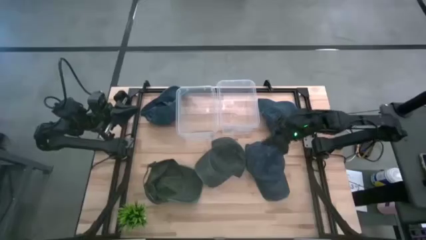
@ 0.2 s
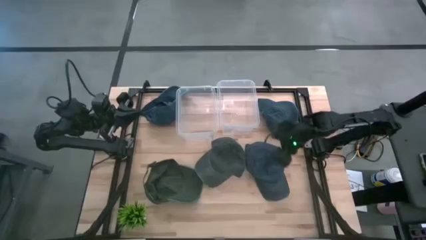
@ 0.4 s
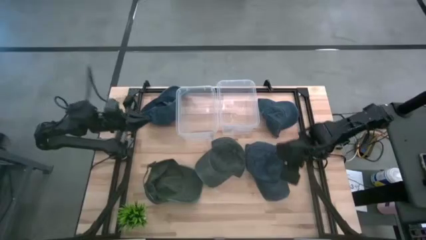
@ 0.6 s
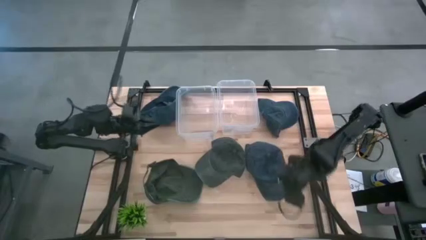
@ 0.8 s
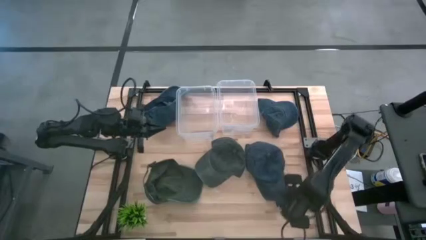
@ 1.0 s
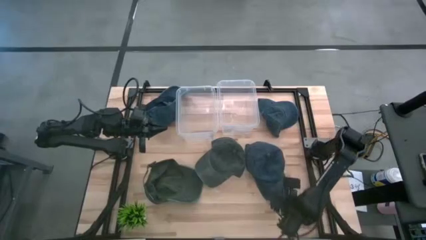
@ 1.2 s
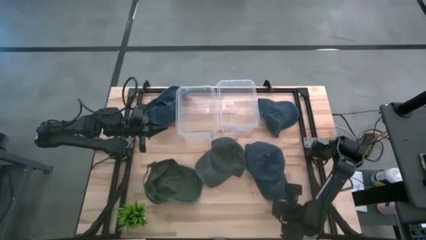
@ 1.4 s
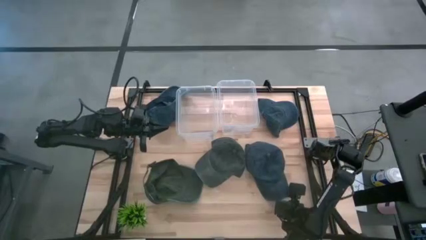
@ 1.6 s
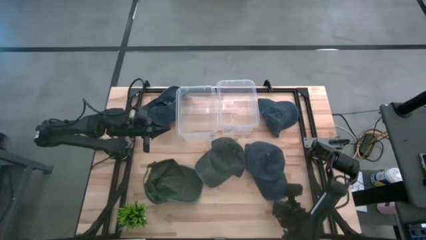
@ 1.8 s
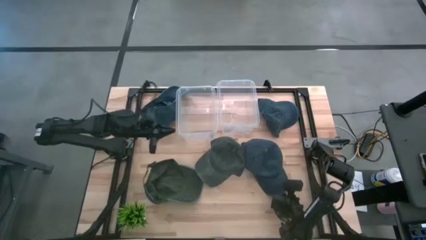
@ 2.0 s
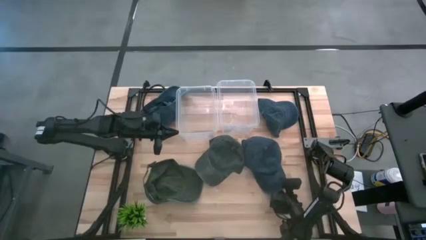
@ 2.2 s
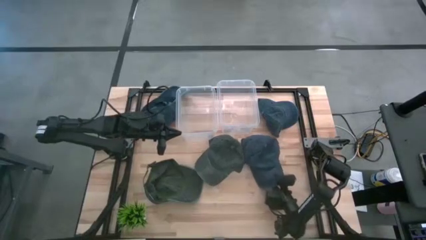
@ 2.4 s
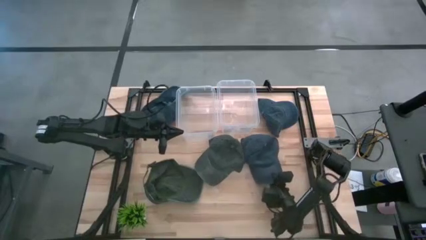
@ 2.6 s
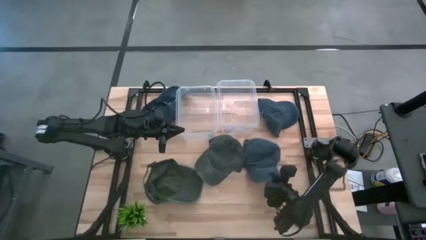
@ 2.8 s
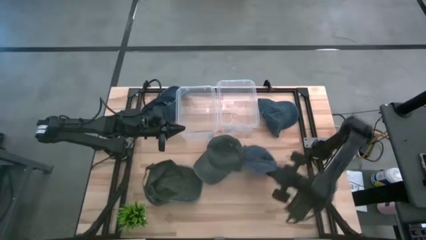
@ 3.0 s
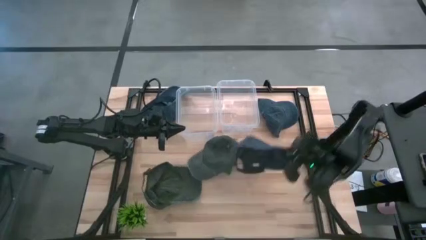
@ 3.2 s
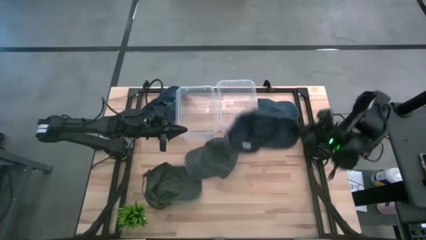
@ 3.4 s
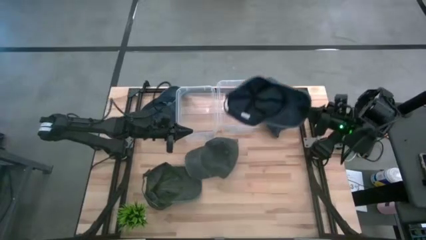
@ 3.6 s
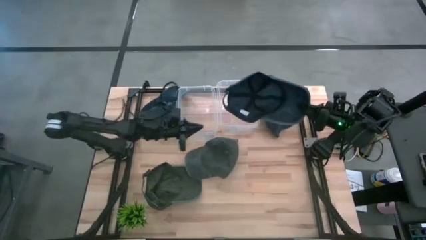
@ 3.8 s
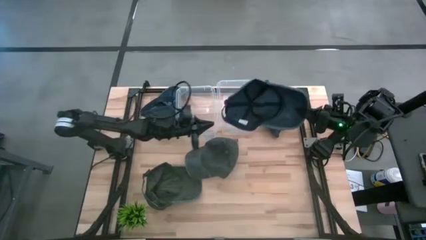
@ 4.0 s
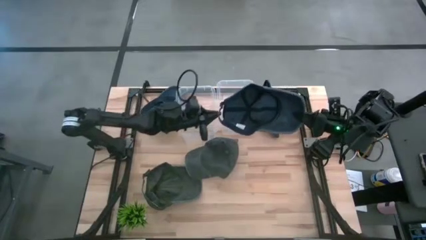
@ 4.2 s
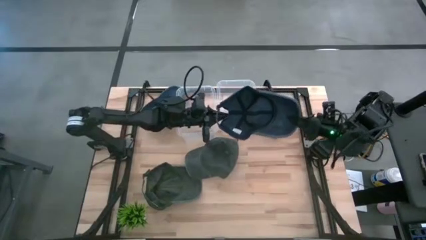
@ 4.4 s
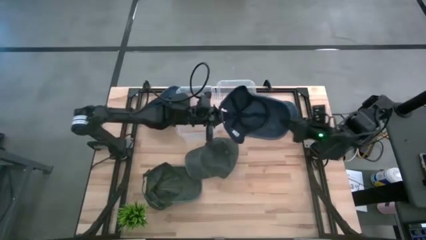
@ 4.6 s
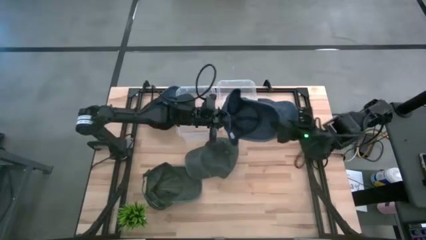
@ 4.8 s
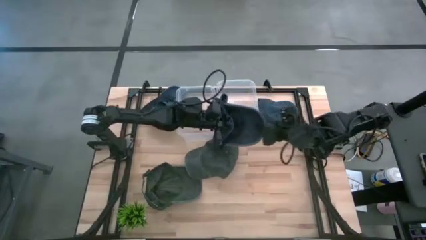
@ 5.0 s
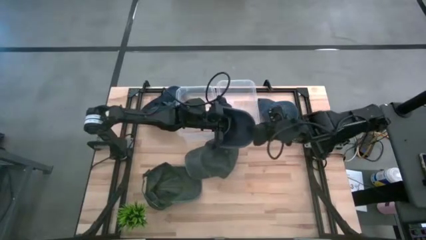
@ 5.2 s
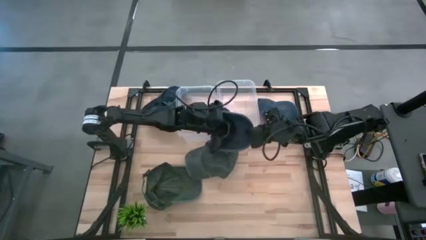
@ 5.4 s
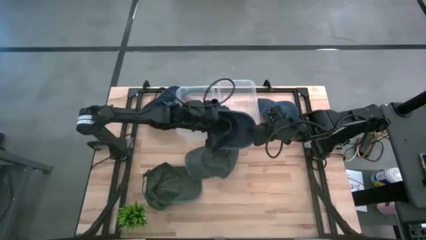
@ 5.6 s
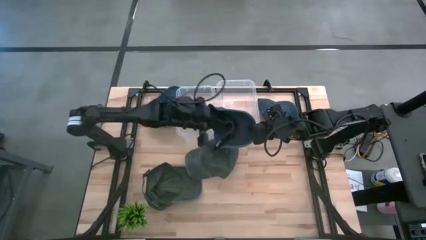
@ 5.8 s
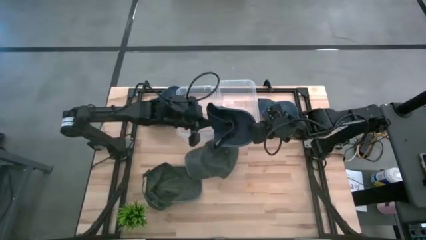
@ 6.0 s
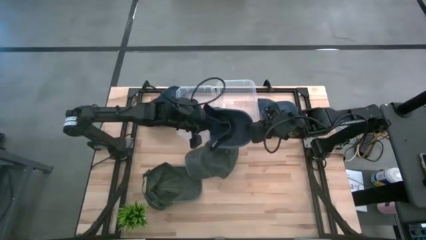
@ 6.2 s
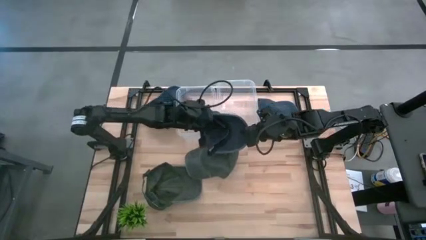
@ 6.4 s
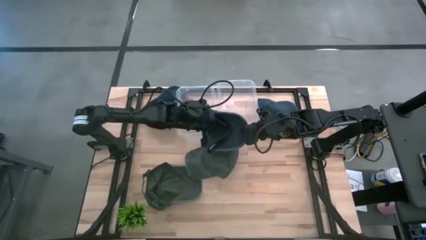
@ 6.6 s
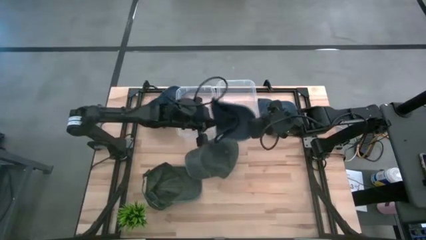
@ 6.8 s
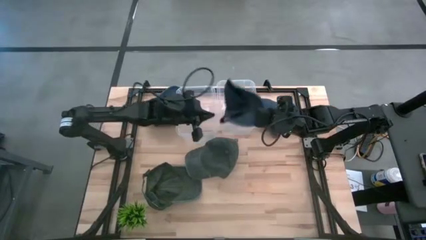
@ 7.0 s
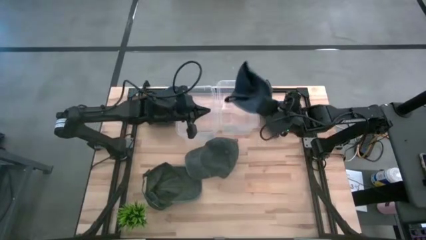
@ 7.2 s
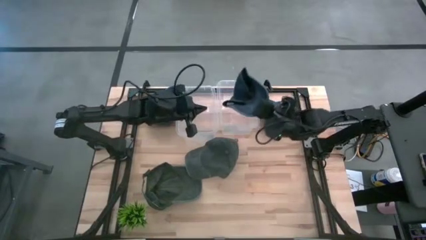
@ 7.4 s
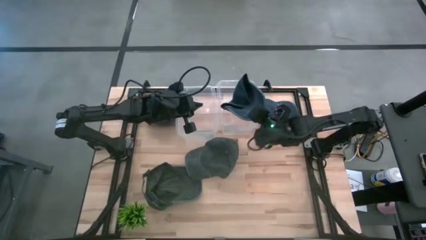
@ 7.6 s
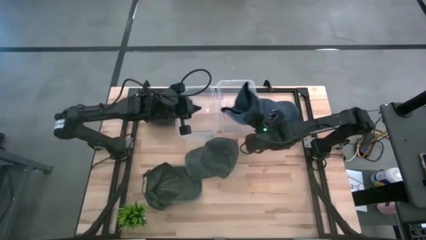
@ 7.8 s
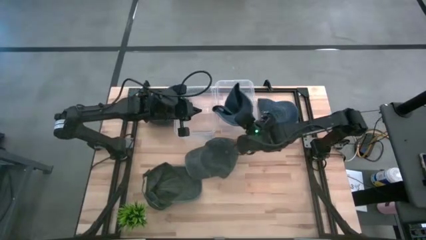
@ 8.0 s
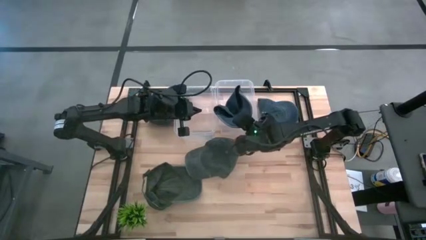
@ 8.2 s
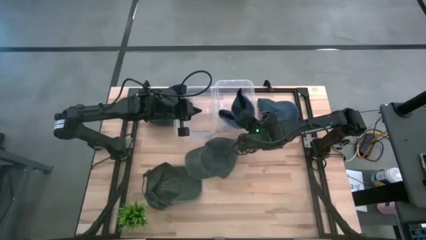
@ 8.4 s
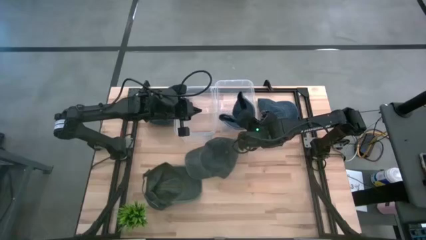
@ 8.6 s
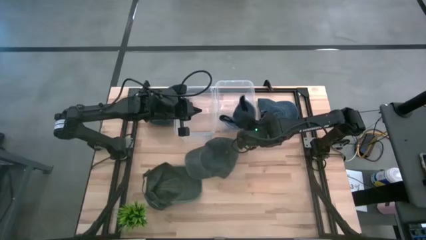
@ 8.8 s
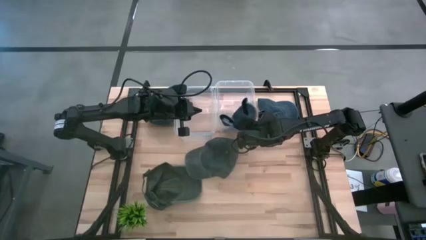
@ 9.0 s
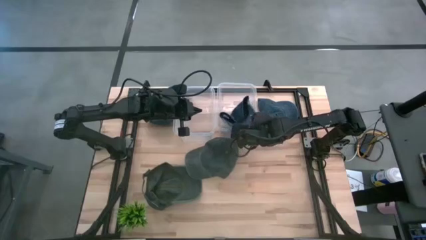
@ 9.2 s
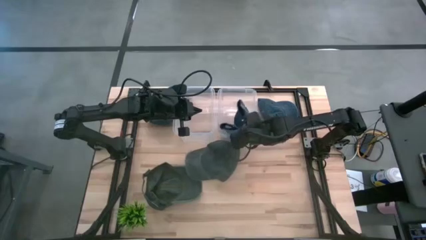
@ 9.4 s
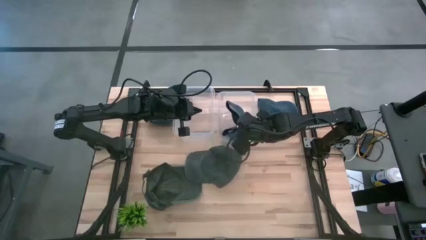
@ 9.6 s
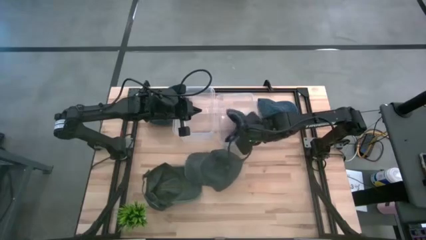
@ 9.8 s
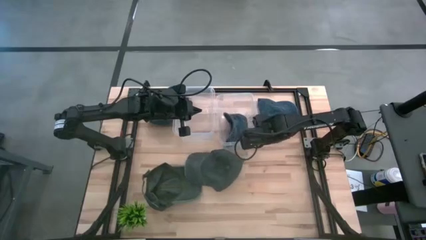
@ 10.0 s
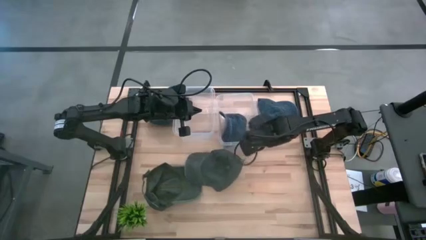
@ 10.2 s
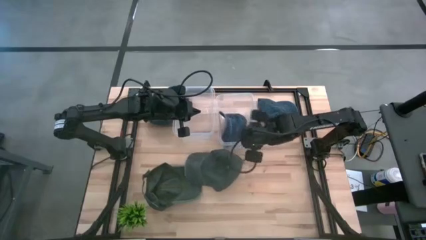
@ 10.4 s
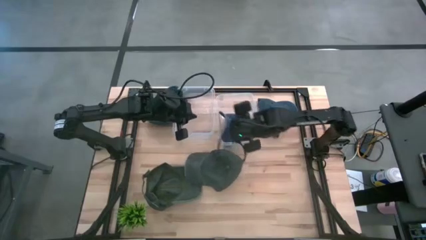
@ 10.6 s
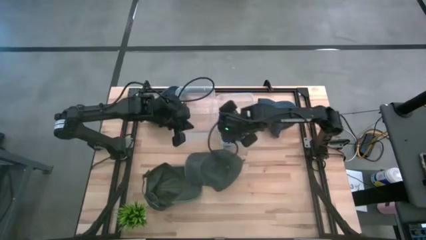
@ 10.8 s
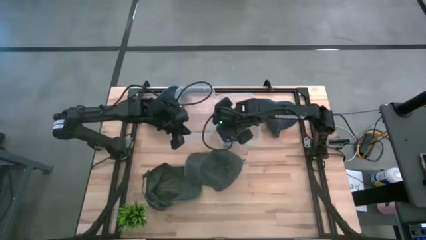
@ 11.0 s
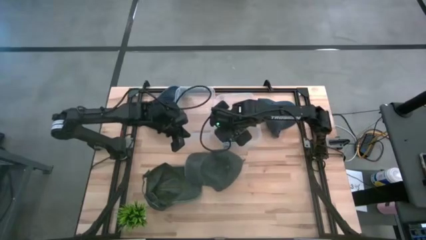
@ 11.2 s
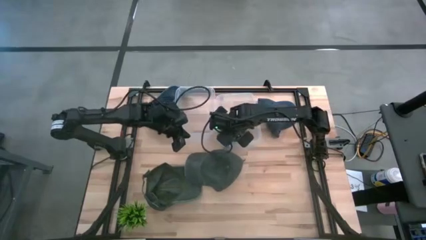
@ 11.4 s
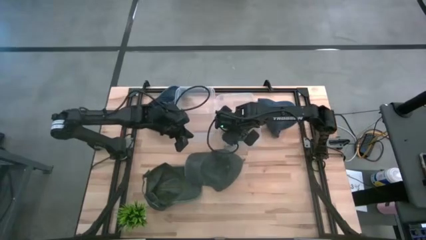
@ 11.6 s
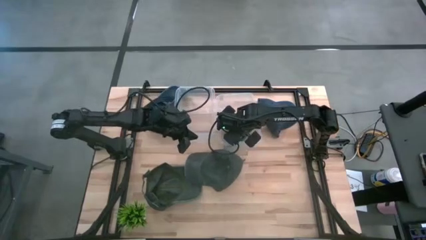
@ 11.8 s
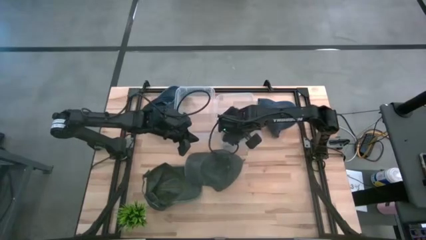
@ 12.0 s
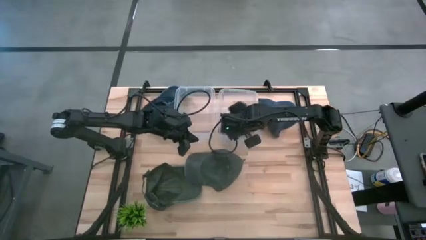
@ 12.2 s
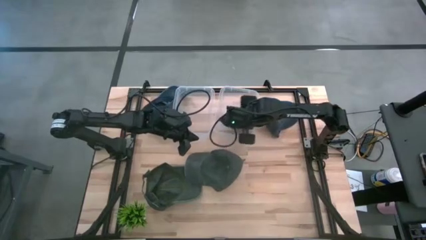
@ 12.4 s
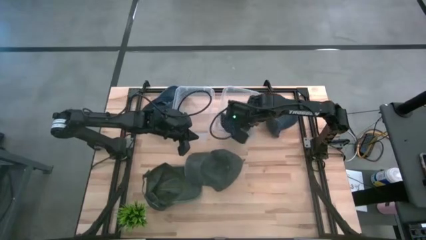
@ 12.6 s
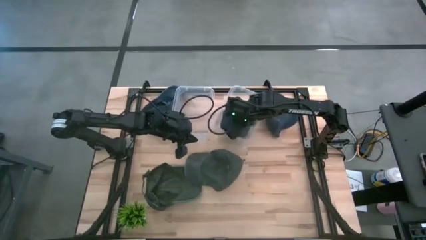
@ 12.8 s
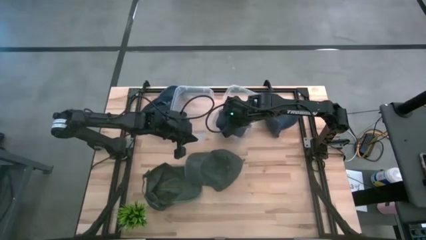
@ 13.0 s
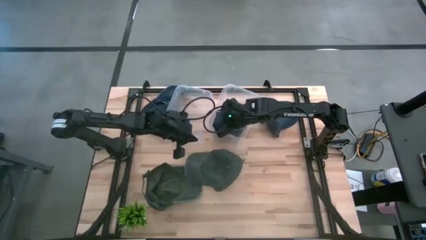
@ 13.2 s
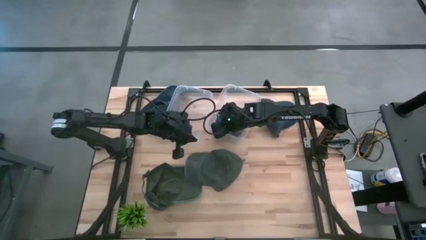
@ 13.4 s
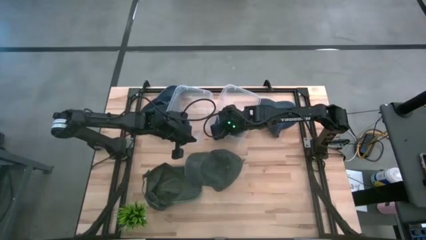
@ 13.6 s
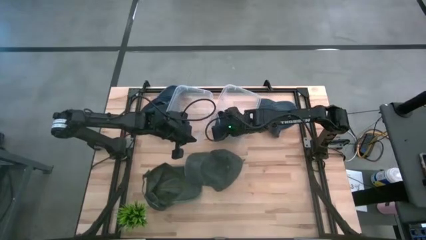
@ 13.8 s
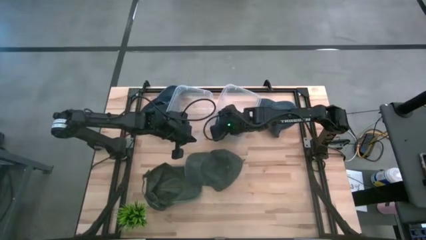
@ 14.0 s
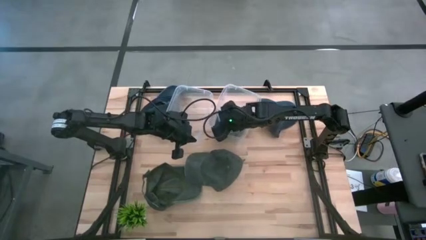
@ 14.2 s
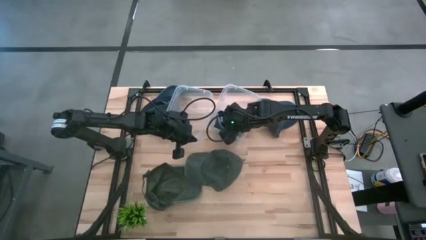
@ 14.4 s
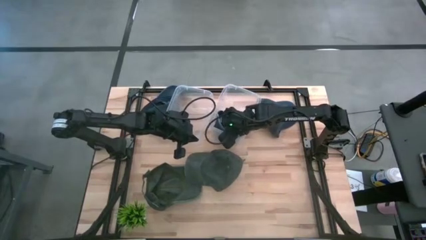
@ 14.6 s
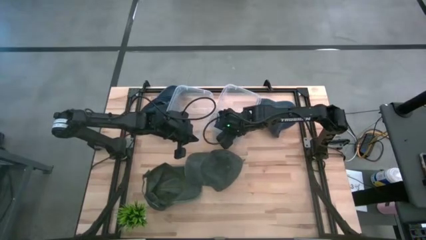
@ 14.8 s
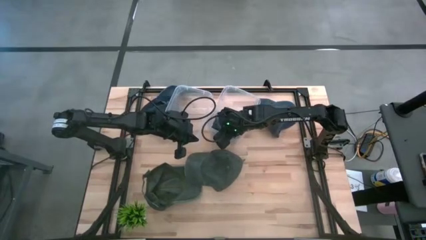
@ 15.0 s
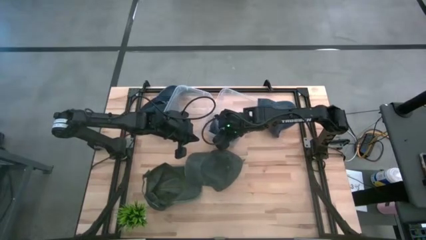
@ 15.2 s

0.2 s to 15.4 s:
Task: Pick & Place hat
Put the bottom blue cap into the right transparent bin

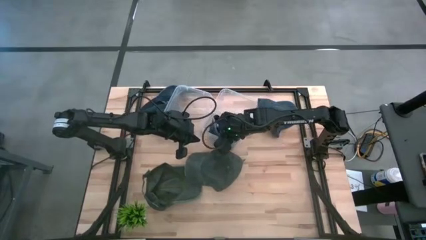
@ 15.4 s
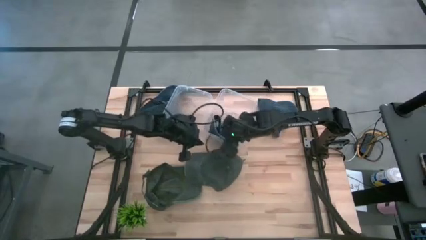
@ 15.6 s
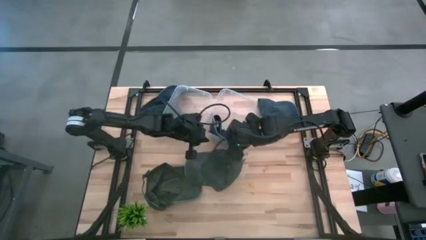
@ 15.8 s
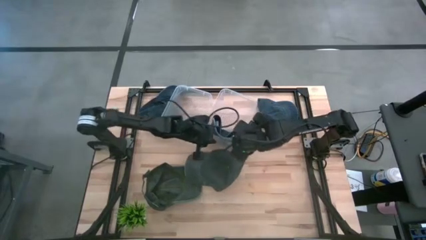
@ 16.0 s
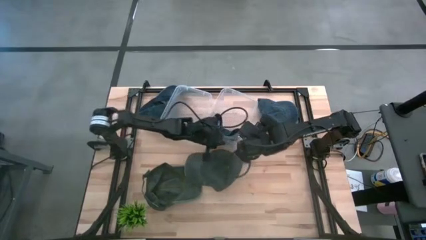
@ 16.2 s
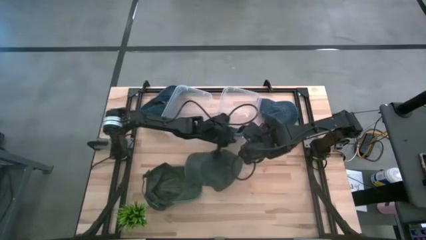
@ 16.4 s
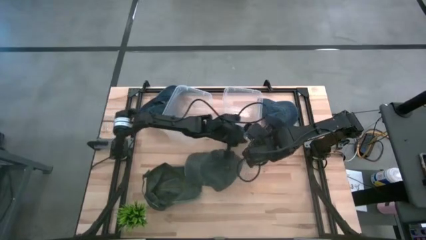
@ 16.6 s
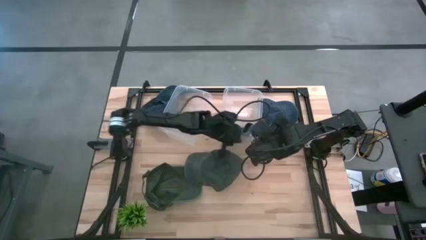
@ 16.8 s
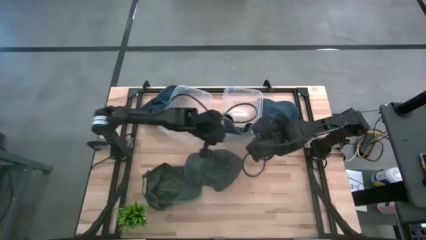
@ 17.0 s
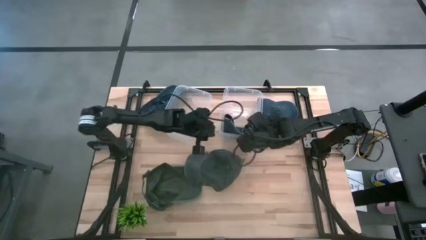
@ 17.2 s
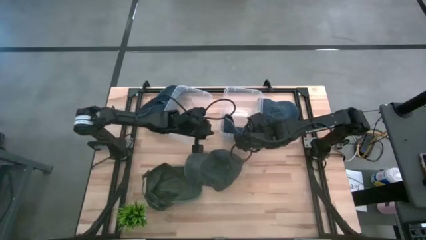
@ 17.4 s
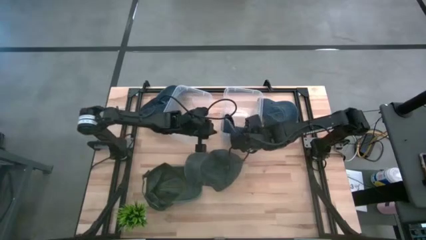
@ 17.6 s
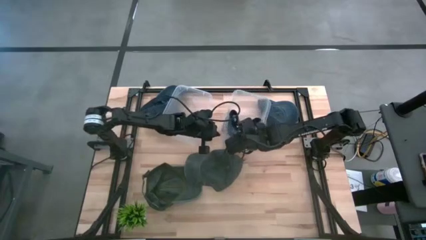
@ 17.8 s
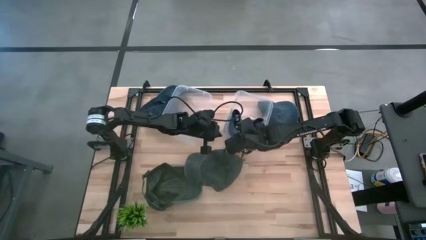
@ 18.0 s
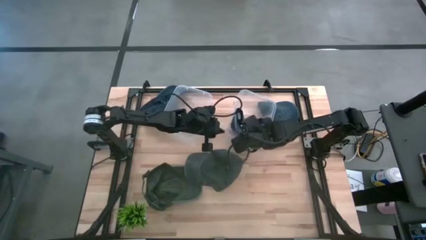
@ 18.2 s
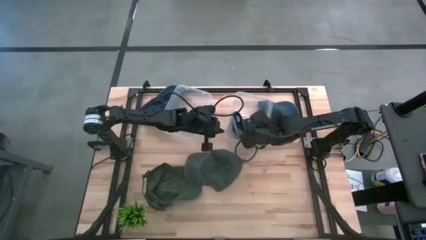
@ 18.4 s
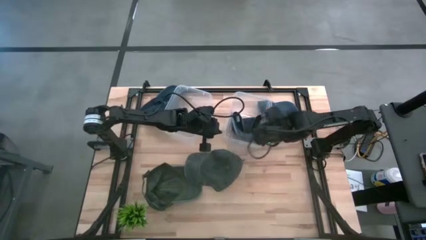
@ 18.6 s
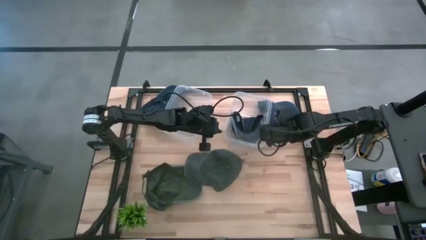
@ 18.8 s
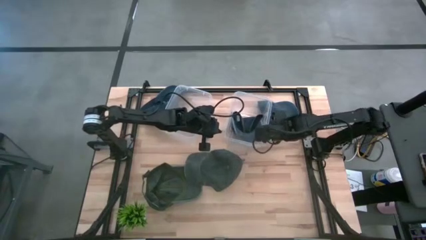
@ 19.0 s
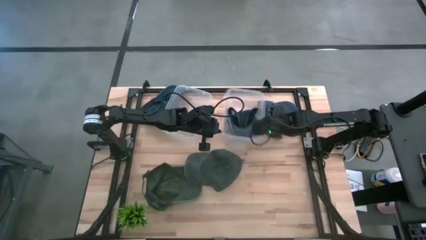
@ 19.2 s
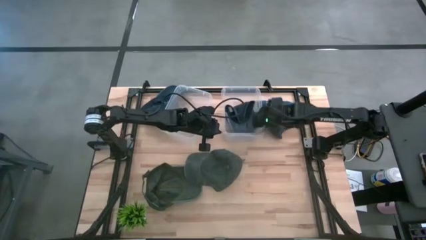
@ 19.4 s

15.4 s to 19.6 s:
Adjust the right transparent bin
